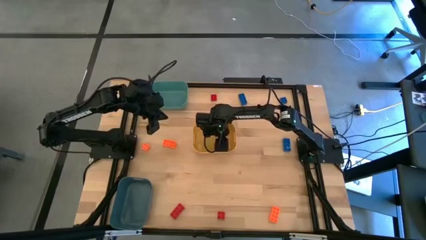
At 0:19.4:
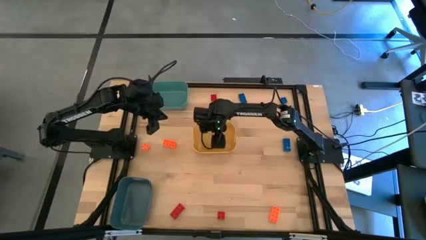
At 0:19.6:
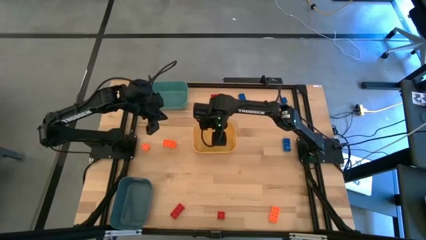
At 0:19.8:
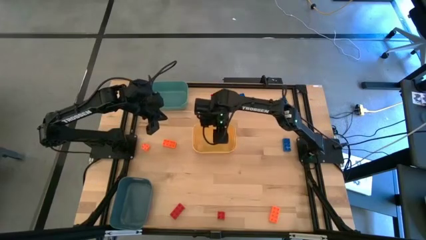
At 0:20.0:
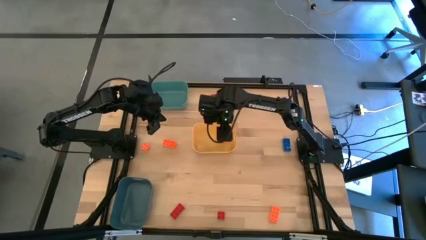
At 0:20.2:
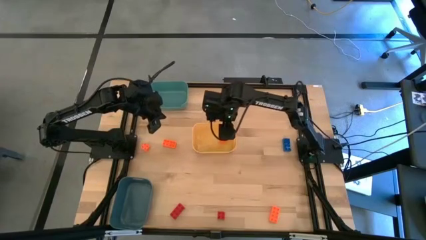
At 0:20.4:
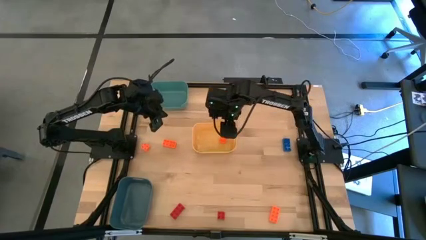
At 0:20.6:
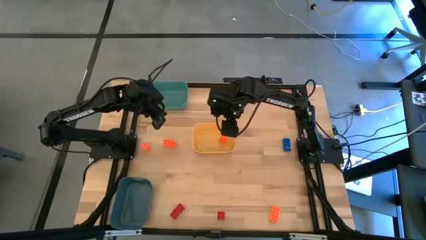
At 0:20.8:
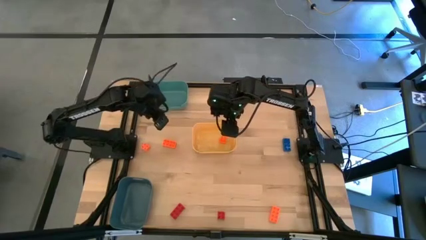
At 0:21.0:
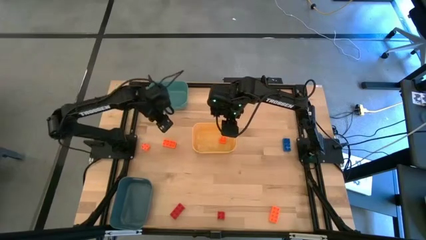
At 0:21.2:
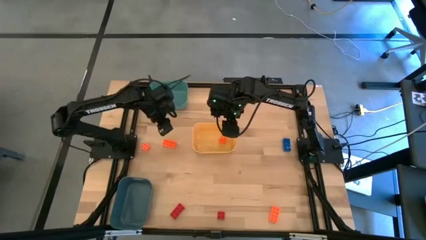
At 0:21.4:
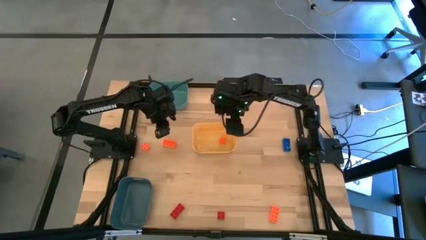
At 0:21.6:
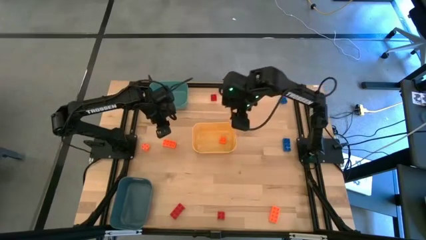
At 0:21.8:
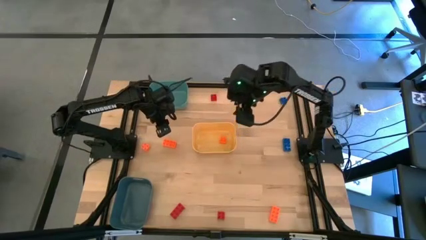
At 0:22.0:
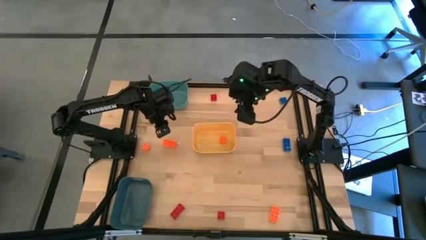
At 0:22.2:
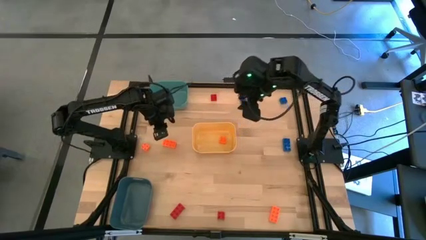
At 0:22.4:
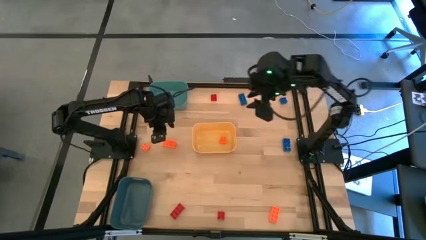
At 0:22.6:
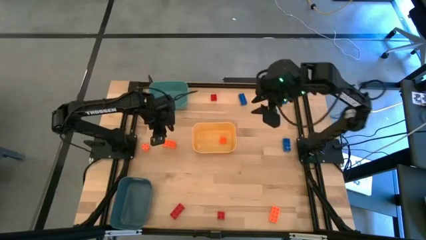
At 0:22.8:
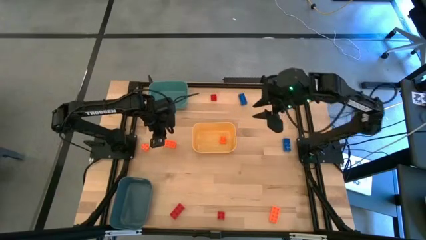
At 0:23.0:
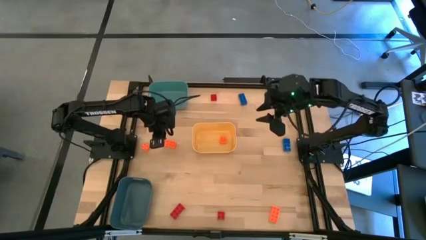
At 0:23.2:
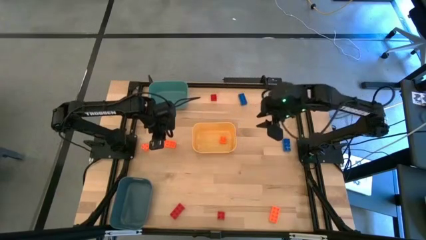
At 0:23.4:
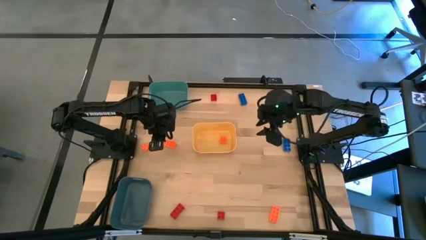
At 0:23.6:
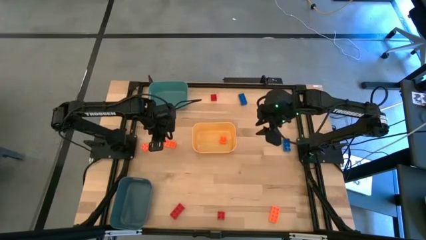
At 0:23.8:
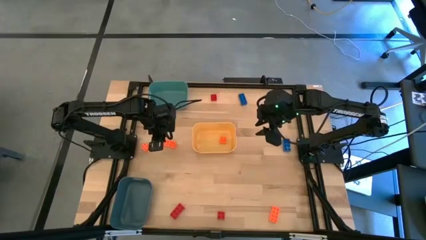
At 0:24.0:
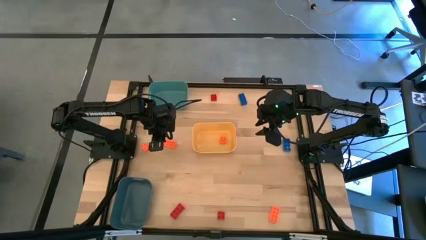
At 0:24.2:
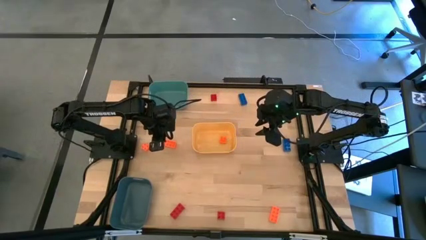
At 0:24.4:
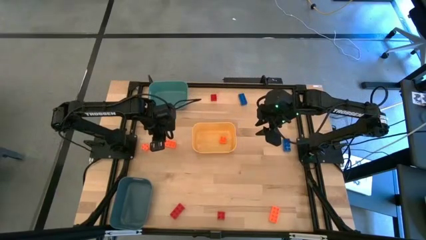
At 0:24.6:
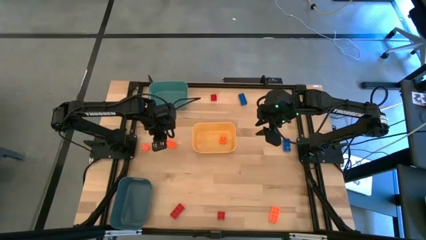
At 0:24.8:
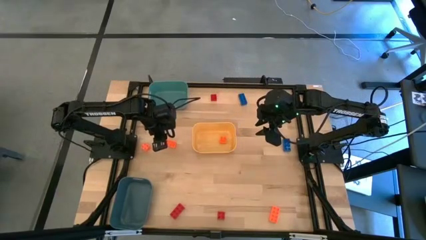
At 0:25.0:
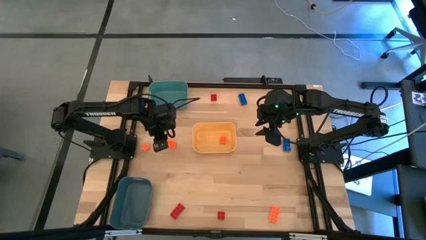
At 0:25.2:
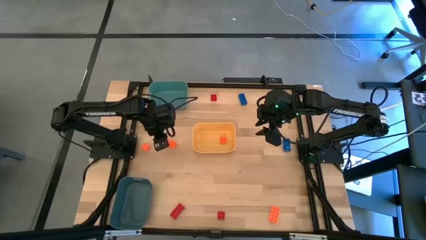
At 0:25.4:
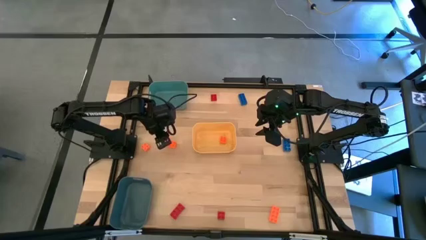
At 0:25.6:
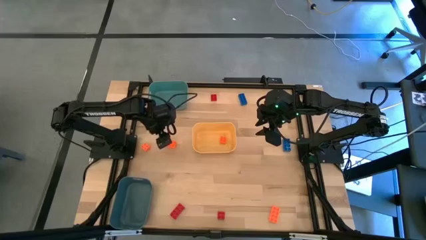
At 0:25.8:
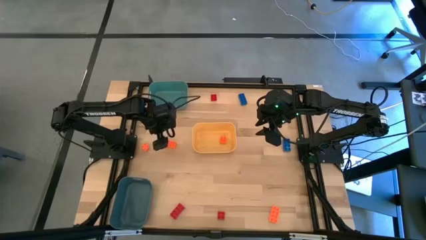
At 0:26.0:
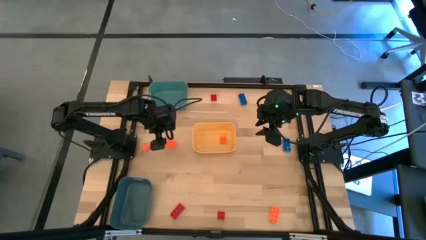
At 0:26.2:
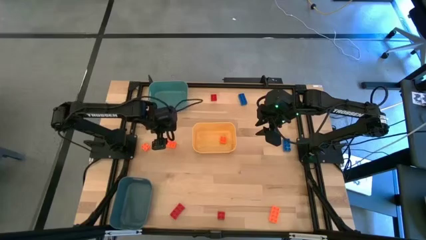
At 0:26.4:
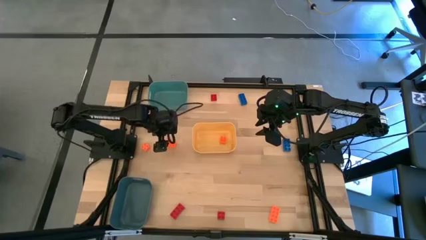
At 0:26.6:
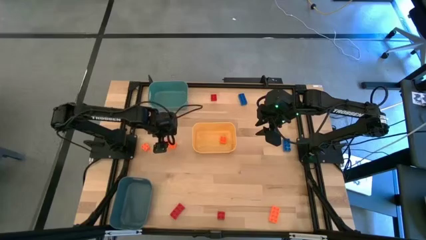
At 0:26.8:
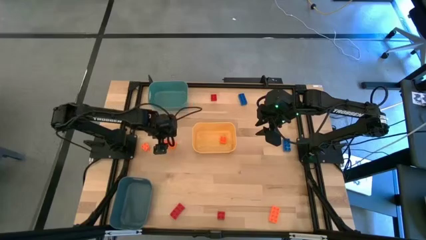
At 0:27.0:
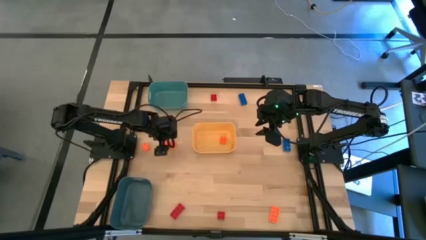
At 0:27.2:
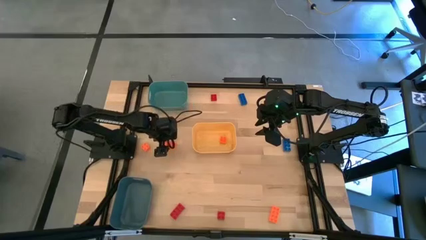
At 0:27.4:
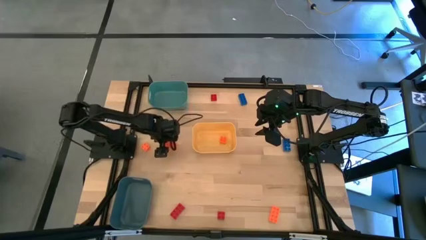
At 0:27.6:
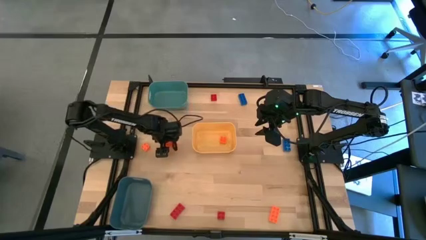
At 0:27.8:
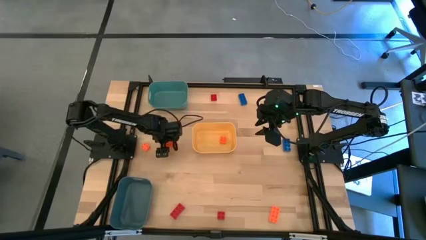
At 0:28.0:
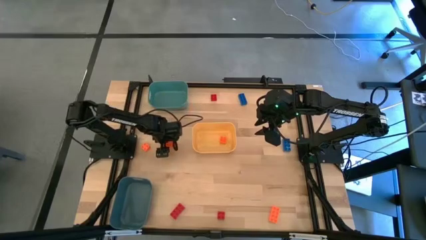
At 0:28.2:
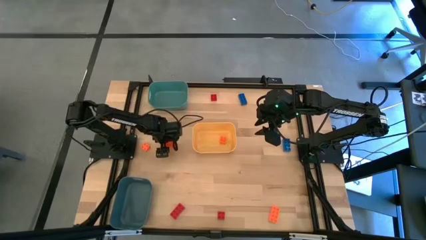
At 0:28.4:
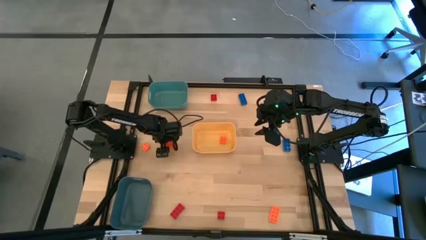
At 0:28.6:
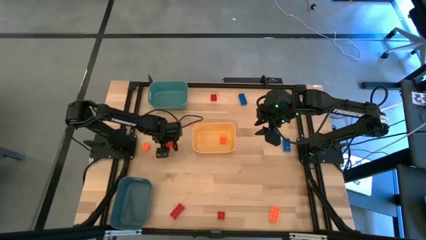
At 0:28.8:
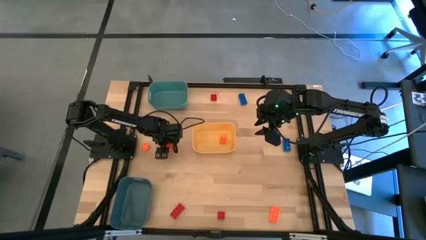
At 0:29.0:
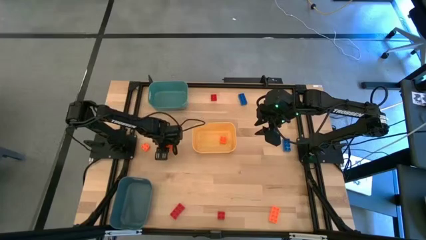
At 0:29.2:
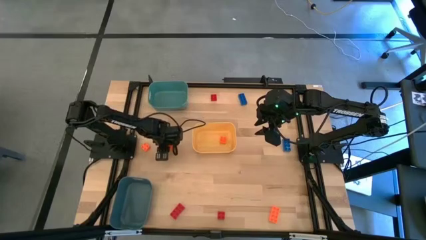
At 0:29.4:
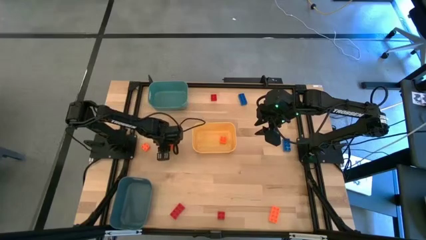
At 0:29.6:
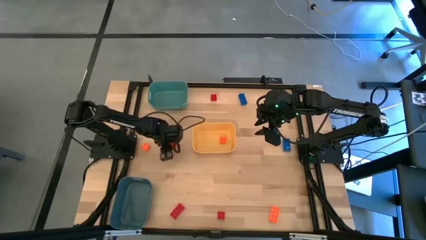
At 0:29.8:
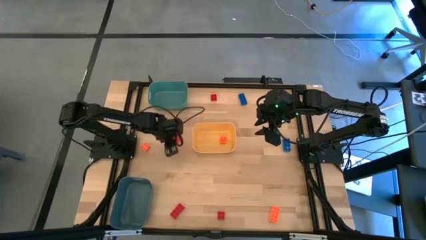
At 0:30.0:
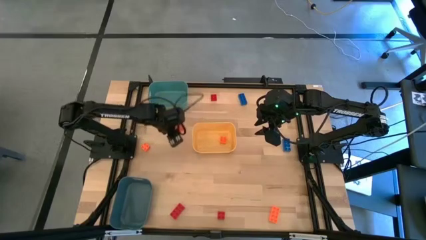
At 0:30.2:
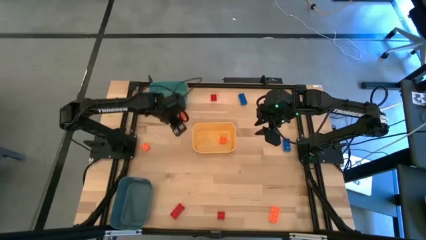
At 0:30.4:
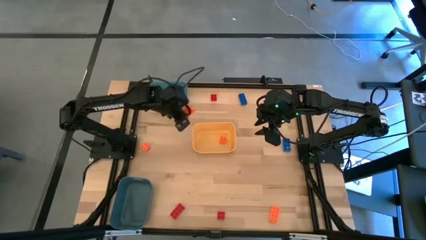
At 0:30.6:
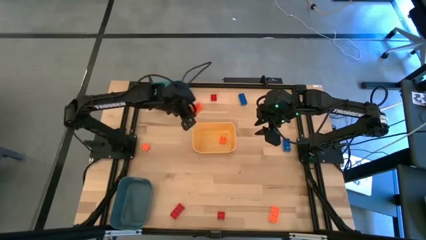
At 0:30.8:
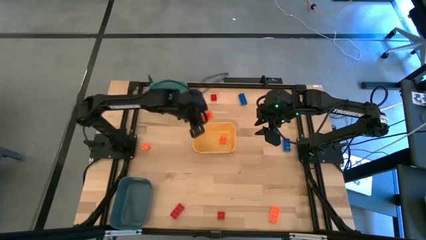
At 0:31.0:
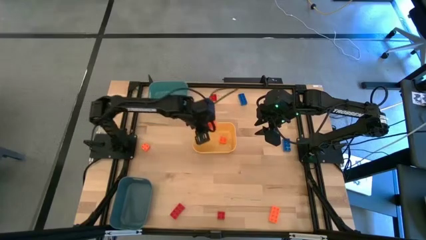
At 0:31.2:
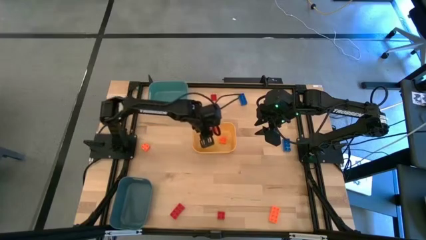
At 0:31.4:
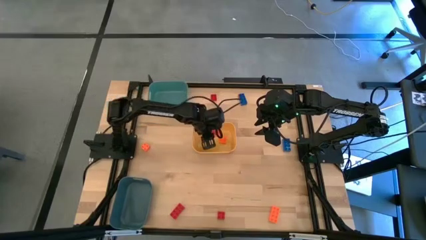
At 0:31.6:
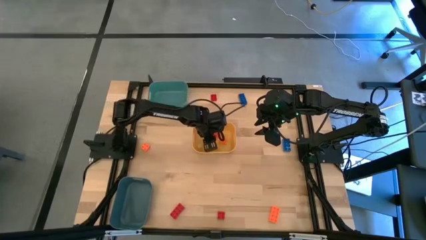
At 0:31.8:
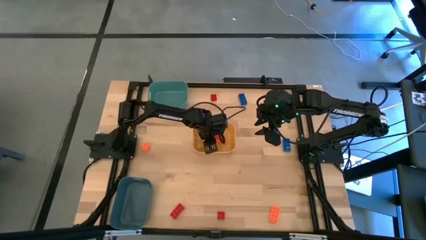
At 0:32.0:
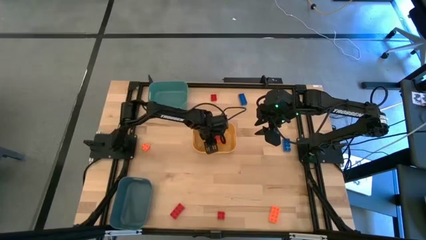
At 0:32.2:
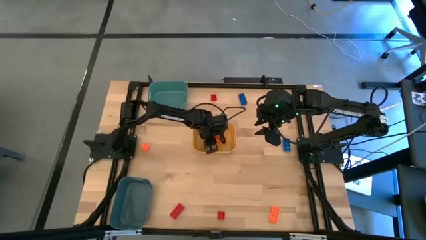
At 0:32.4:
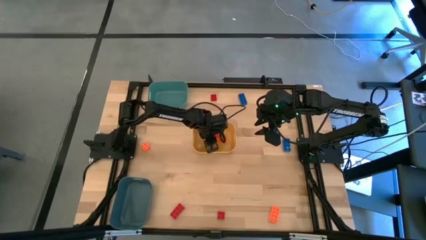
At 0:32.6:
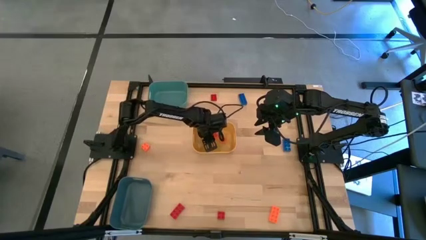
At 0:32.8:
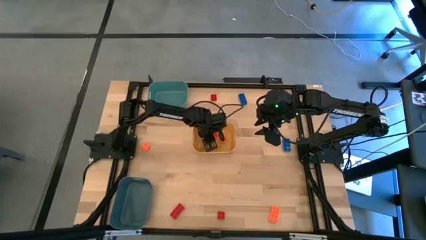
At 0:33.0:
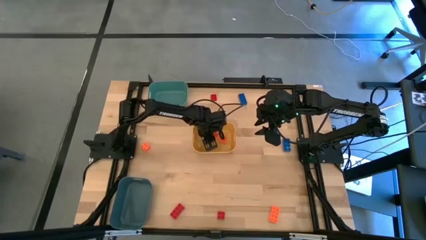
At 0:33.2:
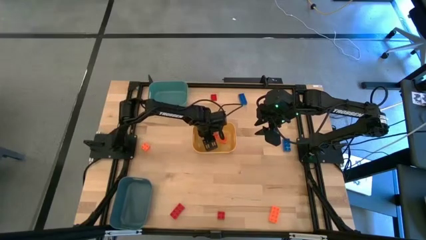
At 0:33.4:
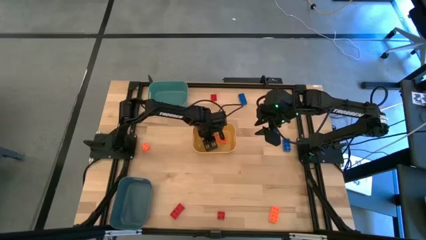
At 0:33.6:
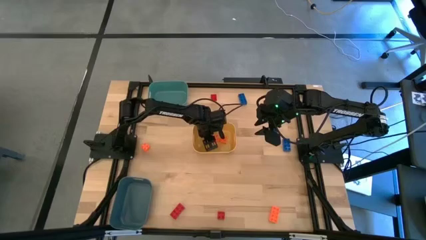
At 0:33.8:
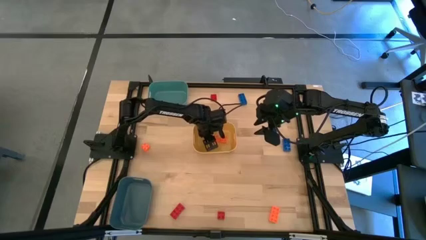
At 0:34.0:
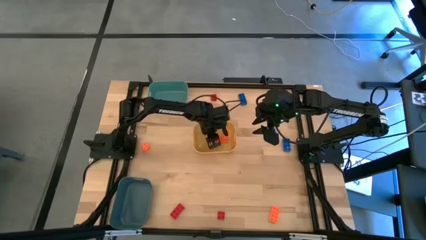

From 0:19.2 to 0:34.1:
Task: Sort & place blocks by color
Put the orange 8 stud game piece into the yellow bin
